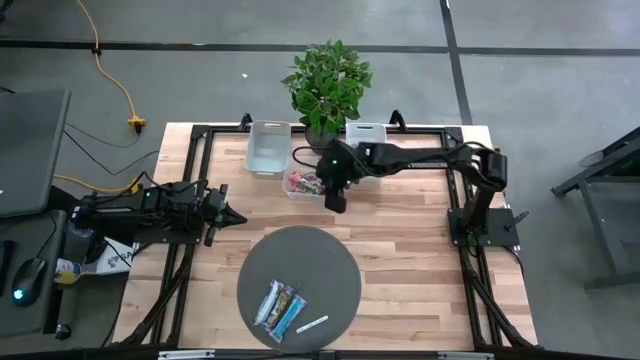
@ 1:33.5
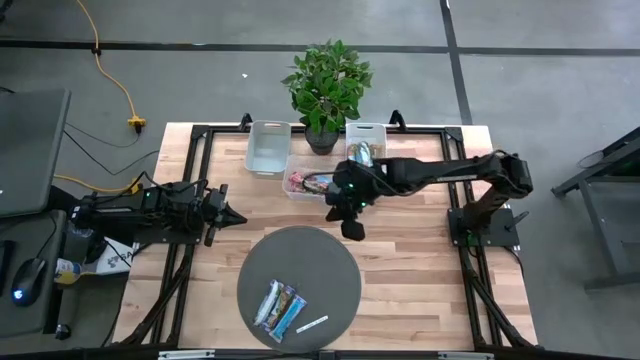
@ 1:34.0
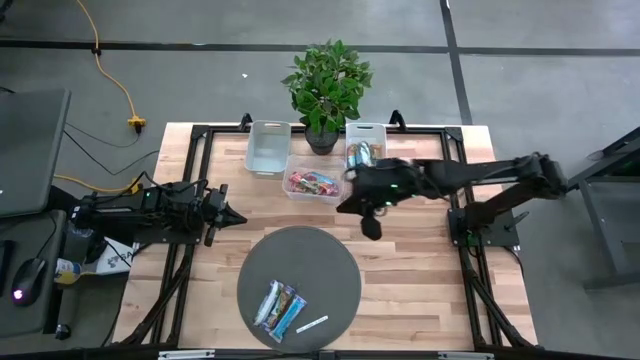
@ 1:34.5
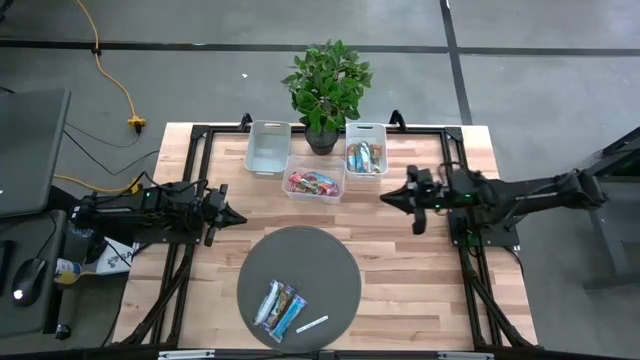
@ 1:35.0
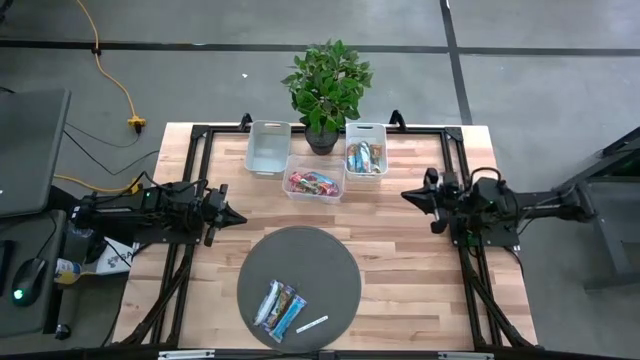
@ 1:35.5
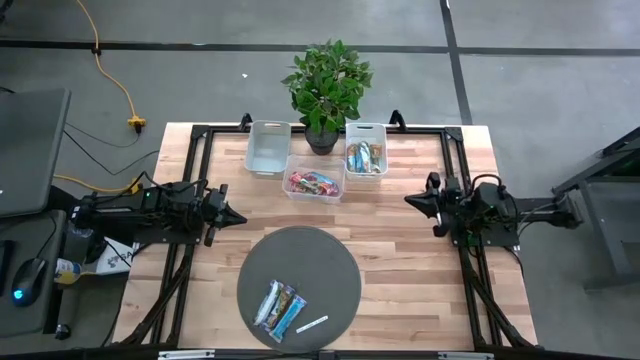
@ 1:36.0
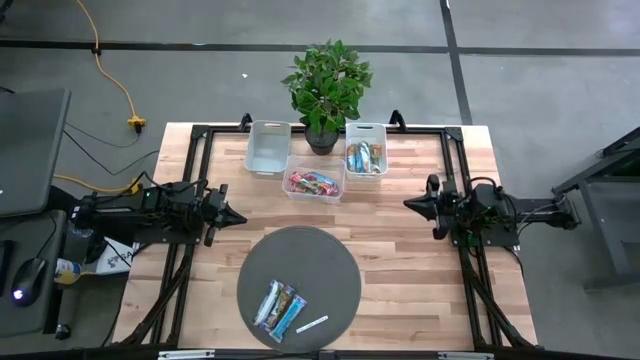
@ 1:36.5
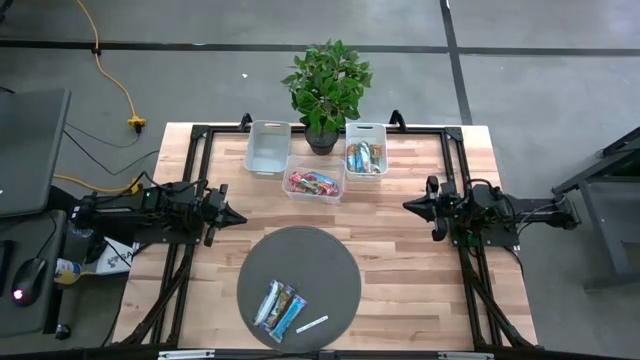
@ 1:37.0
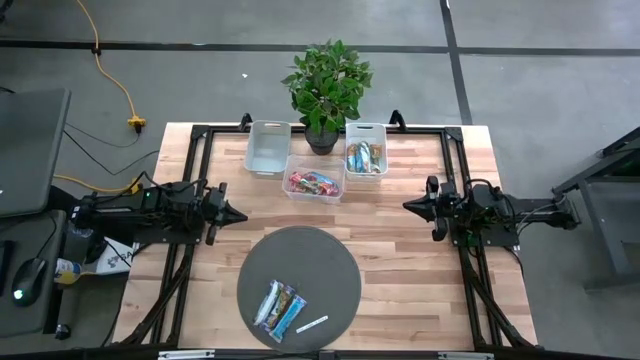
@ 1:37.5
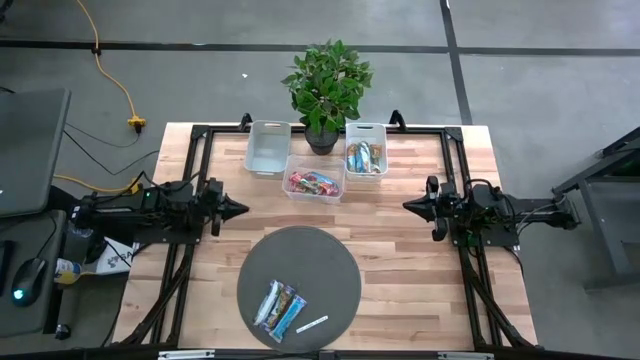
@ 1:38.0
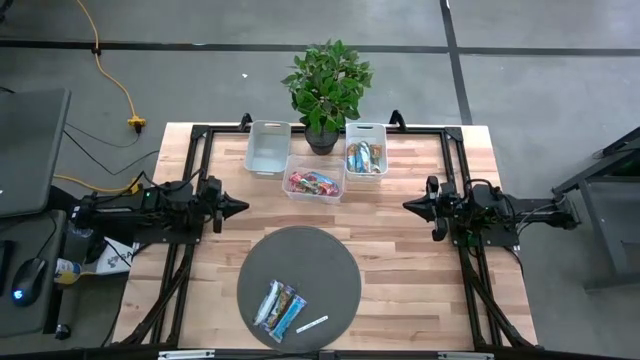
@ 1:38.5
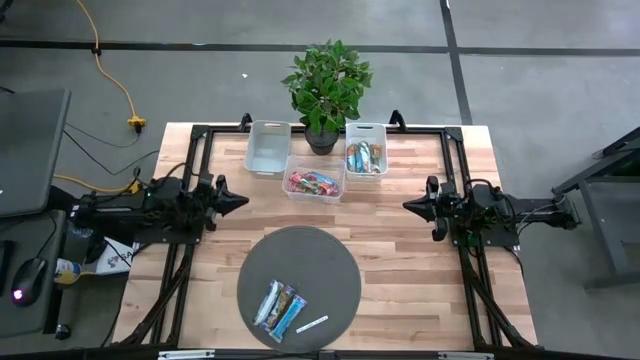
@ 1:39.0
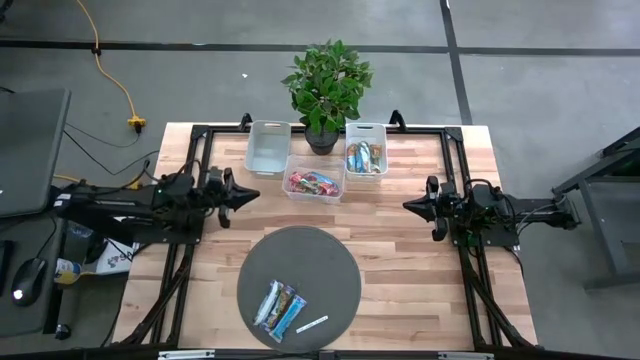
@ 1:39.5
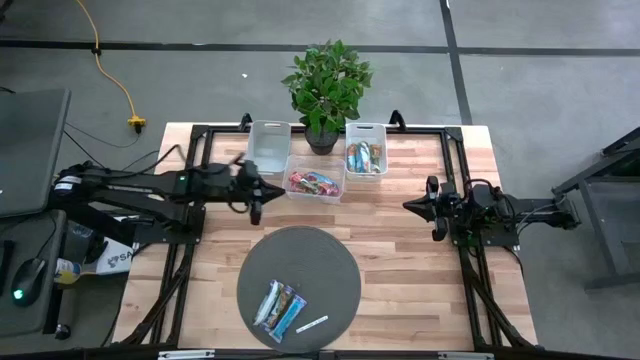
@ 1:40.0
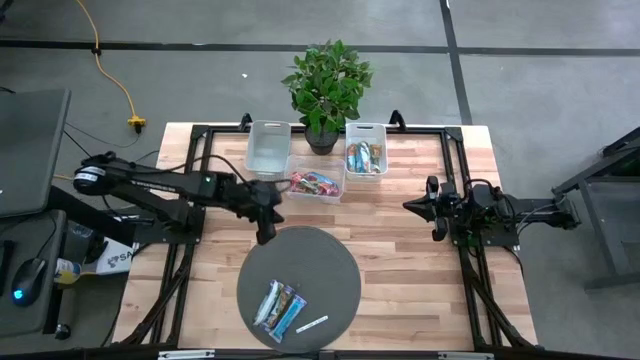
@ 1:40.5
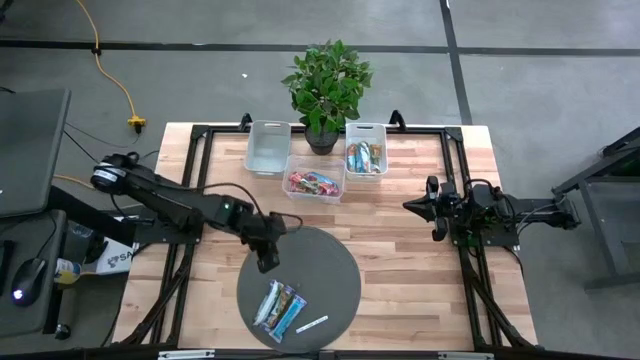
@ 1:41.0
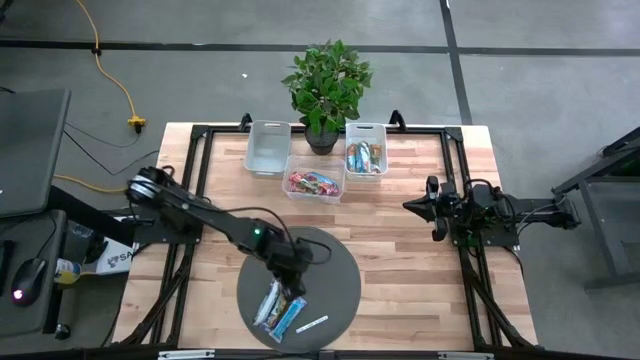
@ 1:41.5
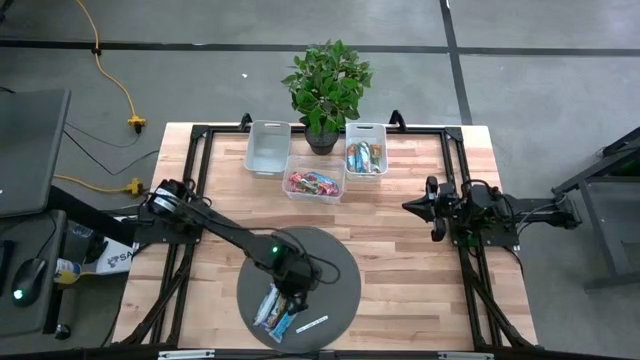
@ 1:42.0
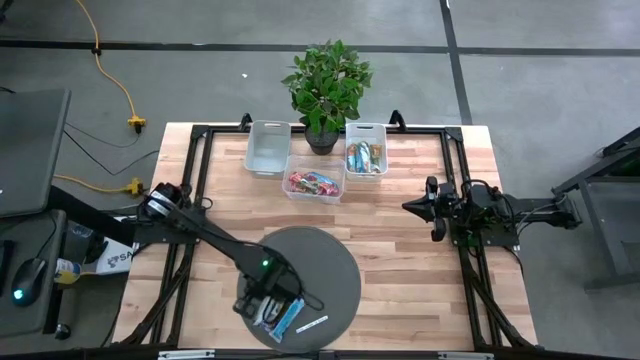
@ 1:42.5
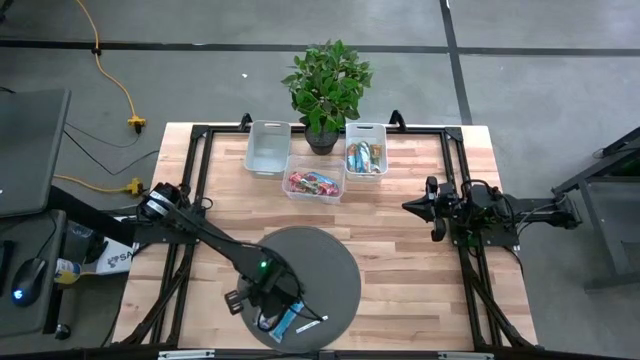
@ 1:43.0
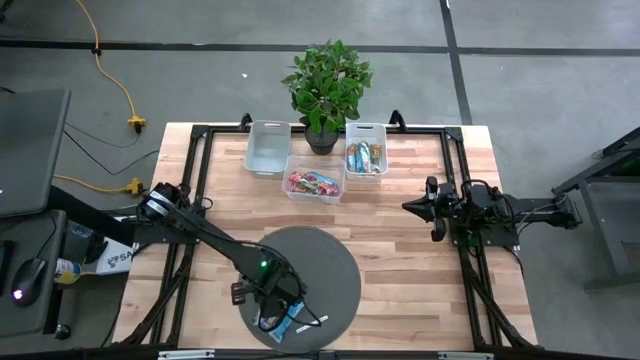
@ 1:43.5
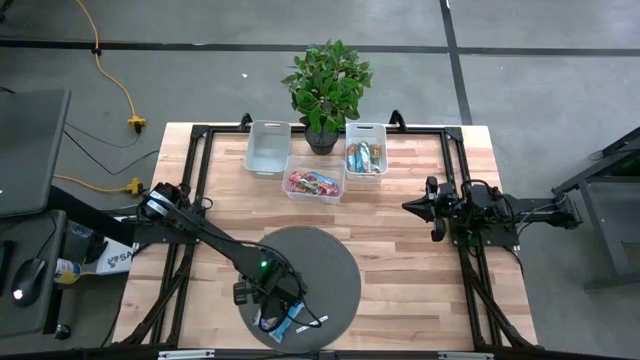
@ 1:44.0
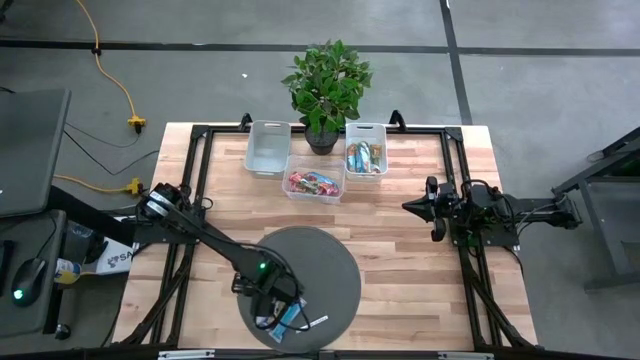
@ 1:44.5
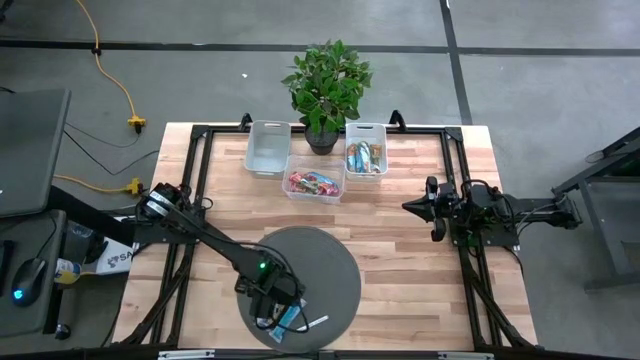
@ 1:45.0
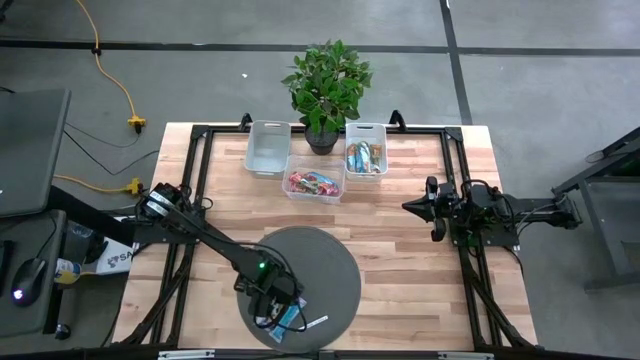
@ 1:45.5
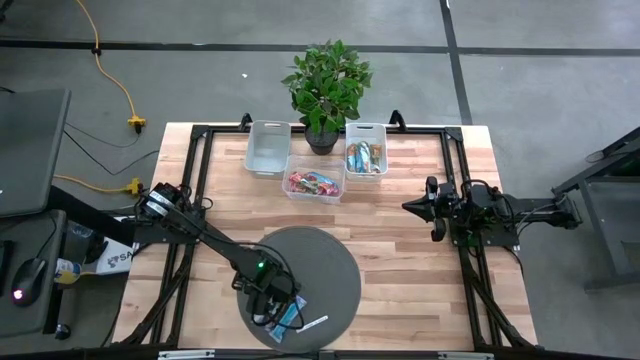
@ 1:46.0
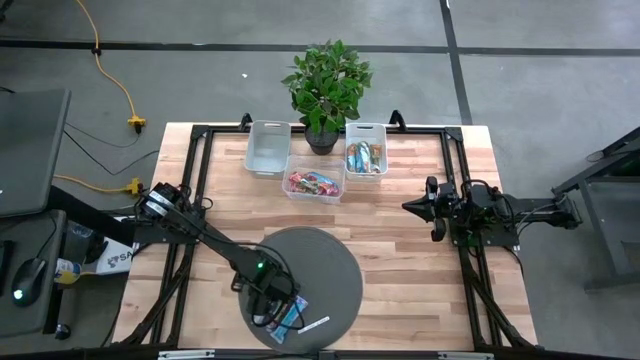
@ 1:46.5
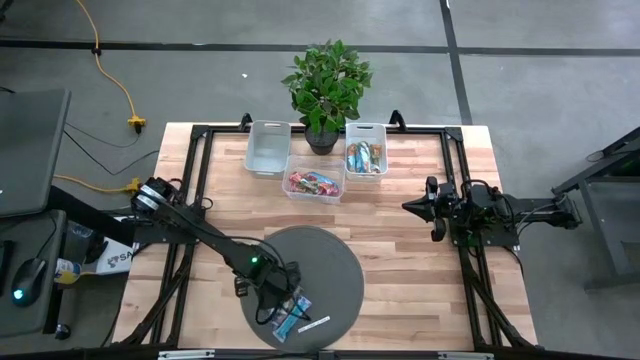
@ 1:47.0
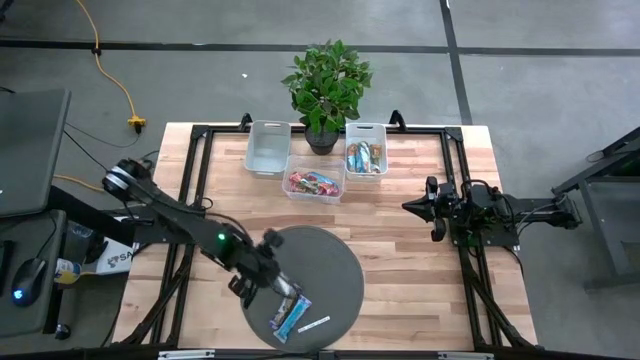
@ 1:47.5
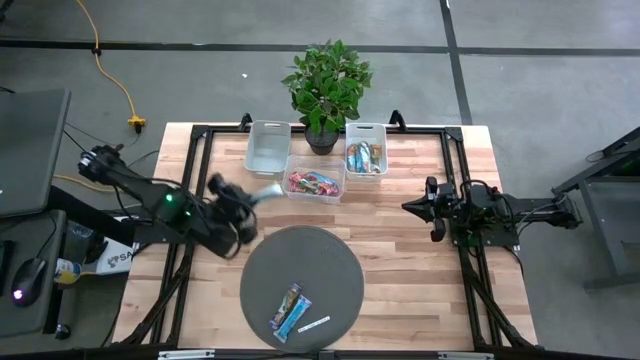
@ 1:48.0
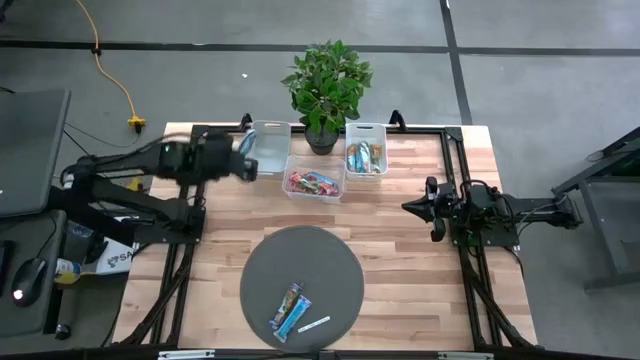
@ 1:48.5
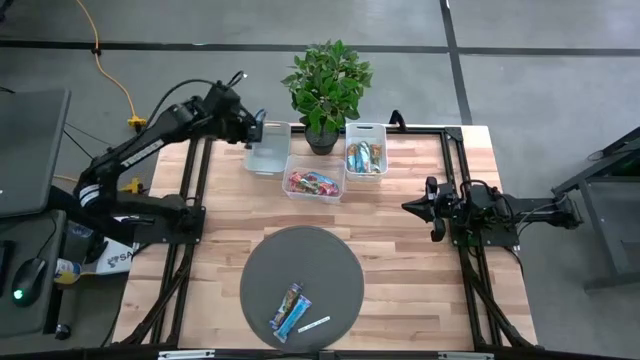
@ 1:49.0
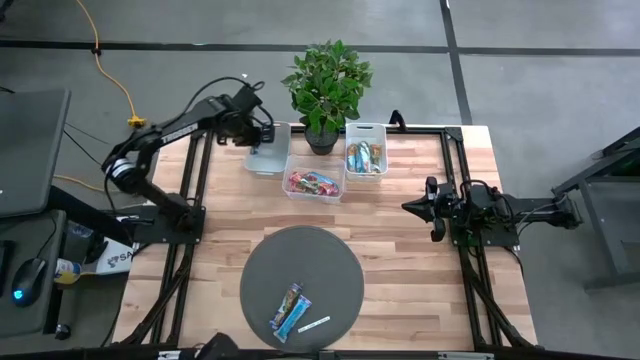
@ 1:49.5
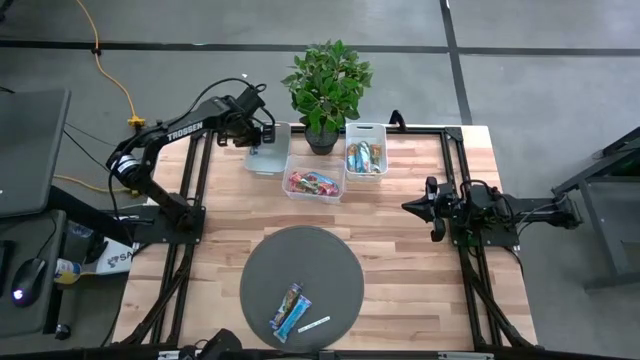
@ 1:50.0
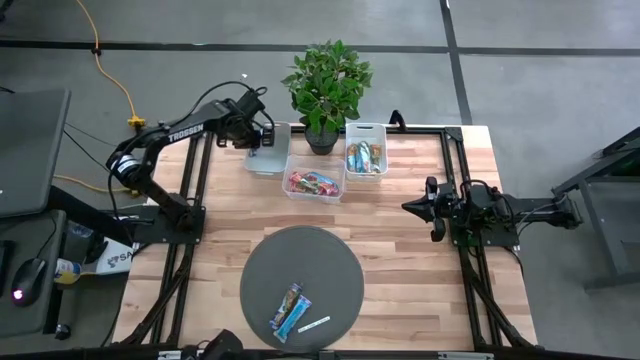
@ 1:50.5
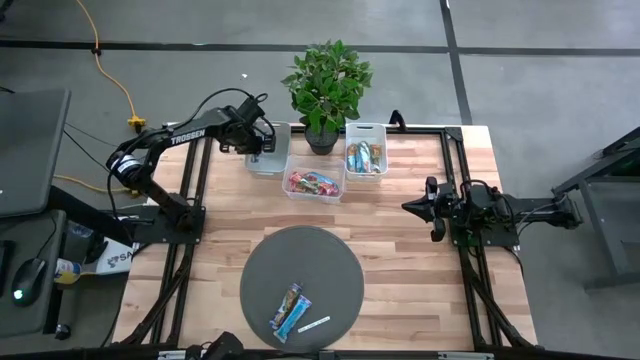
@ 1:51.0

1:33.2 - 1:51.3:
Task: Pick and place Granola Bars by type
Put the blue granola bar into the gray bin

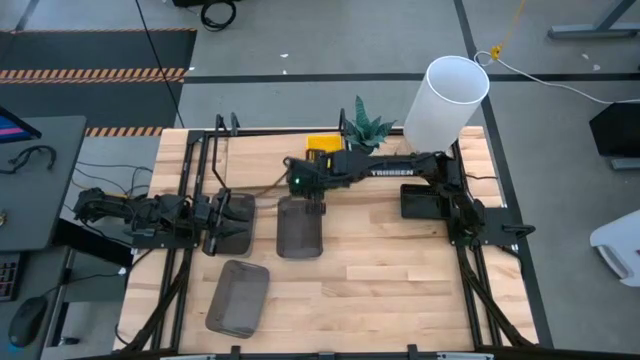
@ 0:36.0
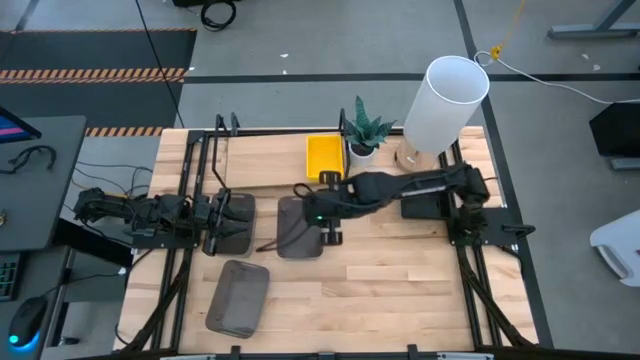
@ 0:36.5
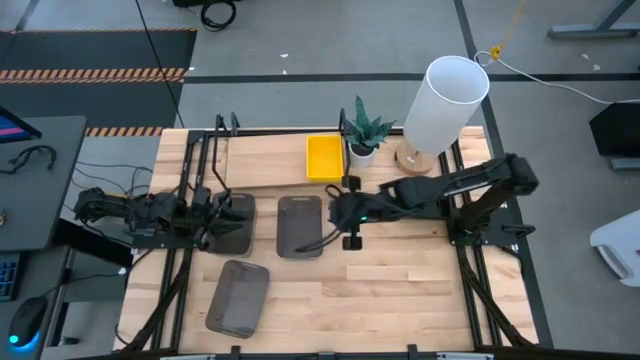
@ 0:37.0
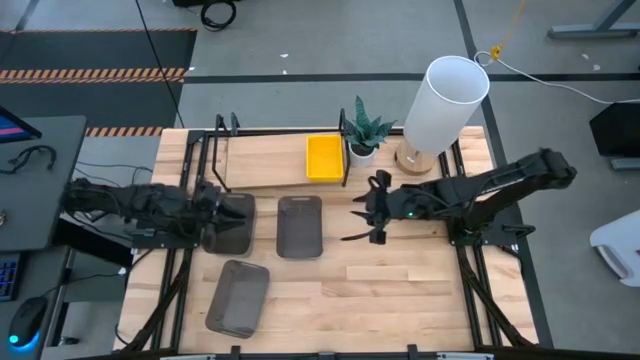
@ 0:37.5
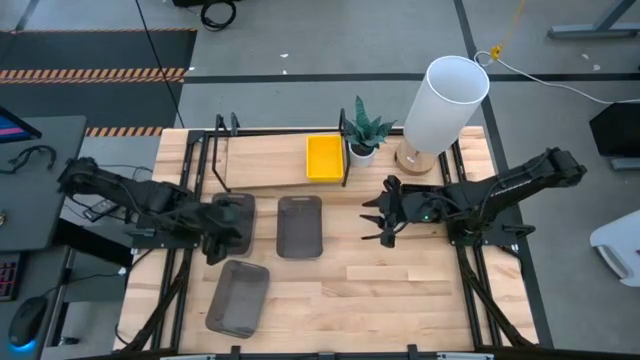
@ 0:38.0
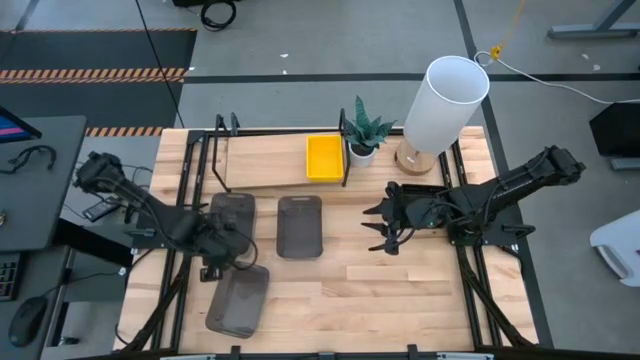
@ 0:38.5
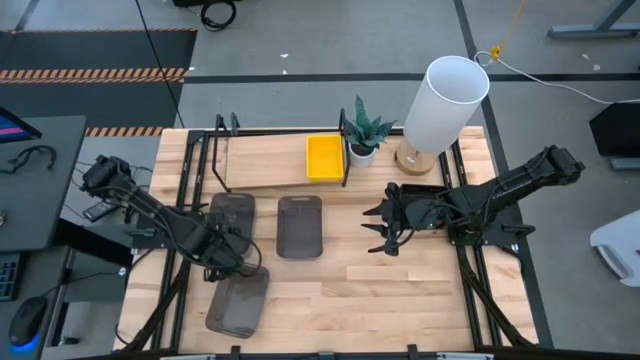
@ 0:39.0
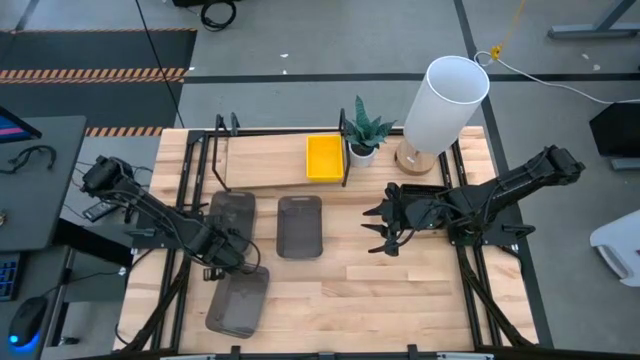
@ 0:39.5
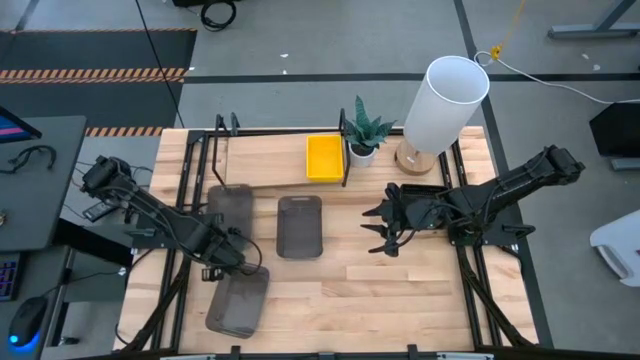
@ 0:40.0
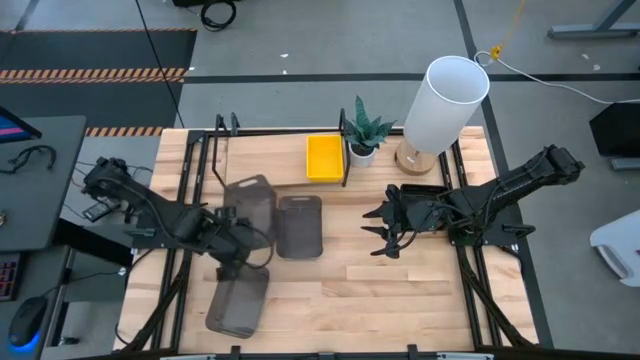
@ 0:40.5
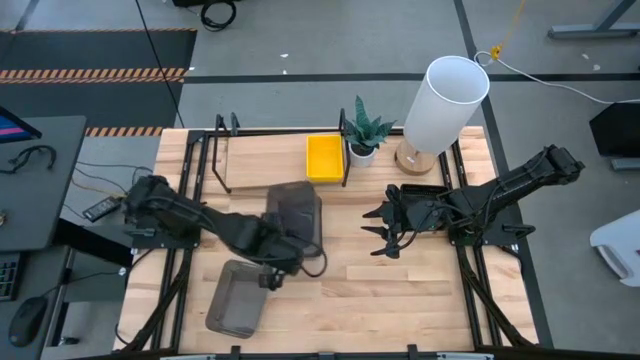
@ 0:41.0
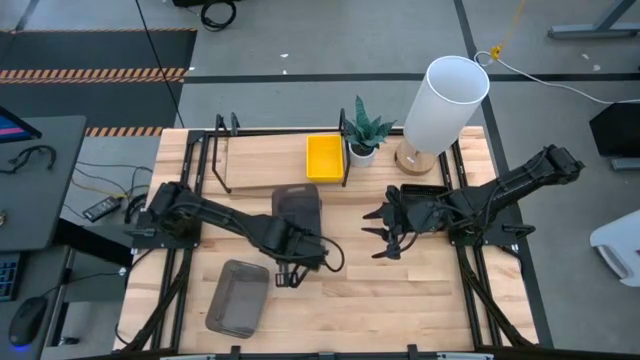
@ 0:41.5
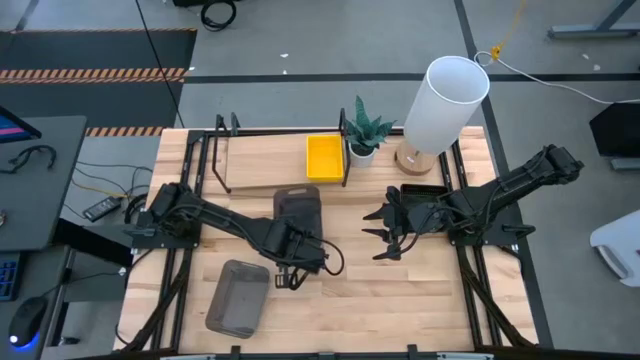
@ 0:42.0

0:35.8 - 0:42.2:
Task: Stack baskets on shelf by color
Stack the top left gray bin on the top of the top gray bin
